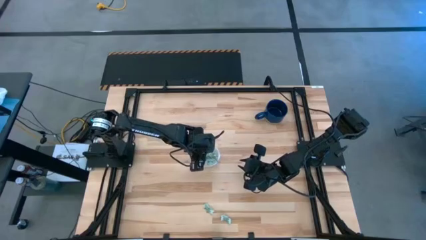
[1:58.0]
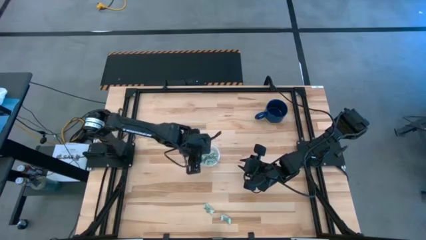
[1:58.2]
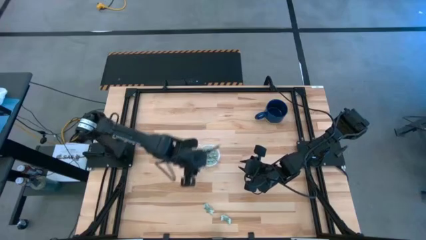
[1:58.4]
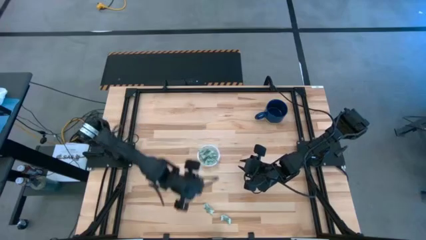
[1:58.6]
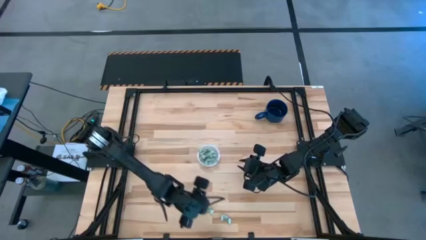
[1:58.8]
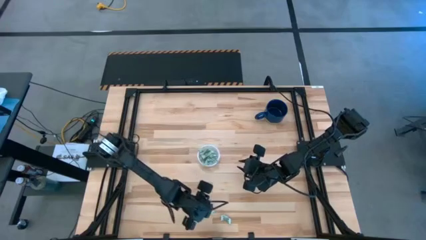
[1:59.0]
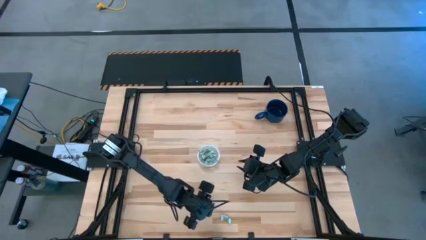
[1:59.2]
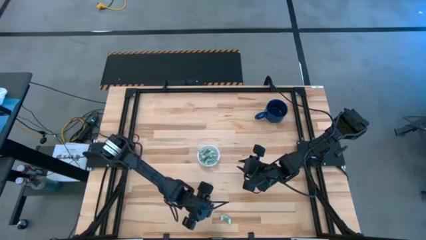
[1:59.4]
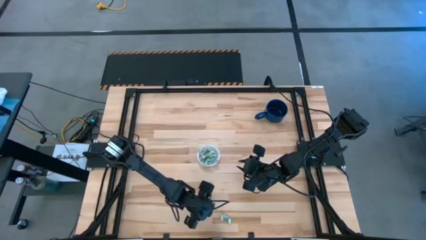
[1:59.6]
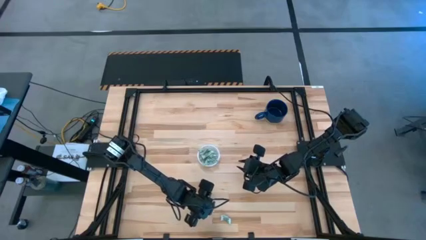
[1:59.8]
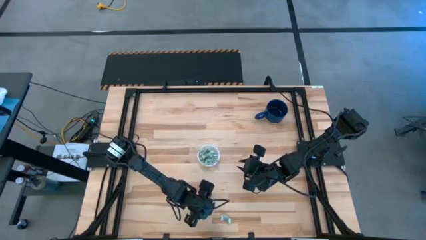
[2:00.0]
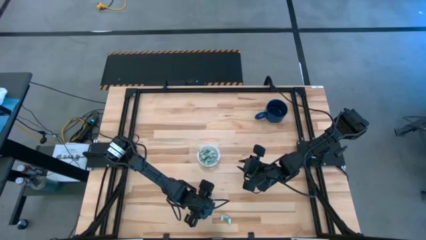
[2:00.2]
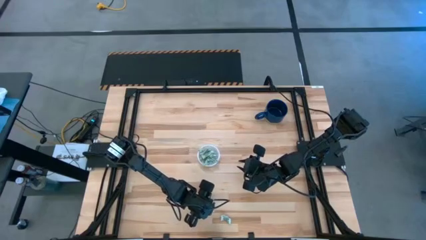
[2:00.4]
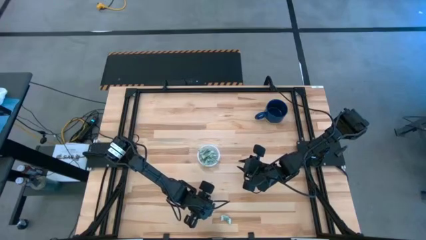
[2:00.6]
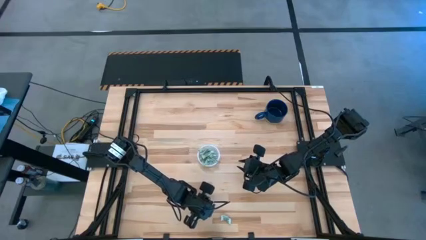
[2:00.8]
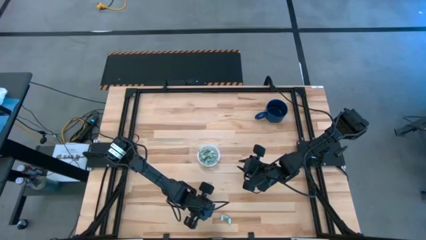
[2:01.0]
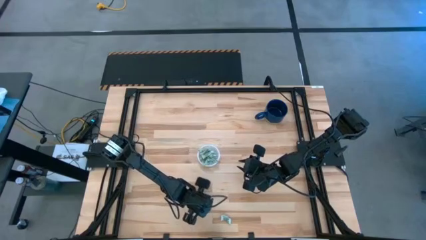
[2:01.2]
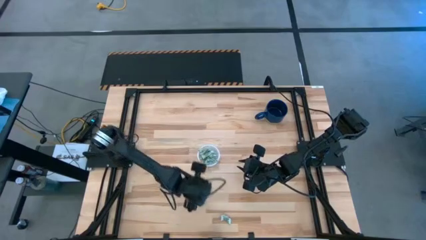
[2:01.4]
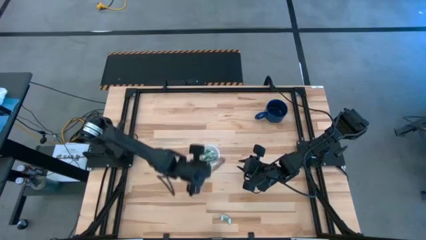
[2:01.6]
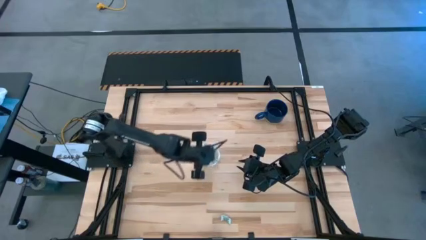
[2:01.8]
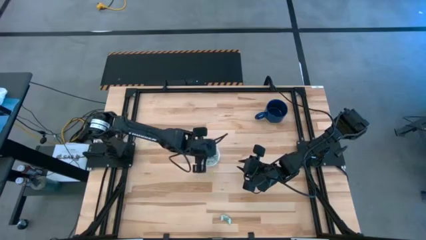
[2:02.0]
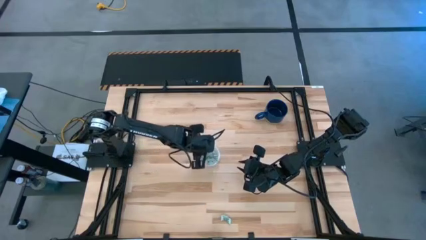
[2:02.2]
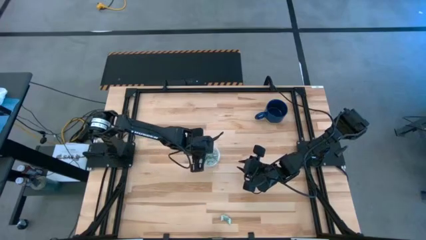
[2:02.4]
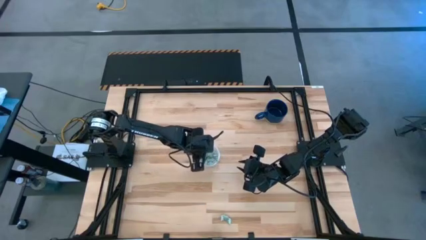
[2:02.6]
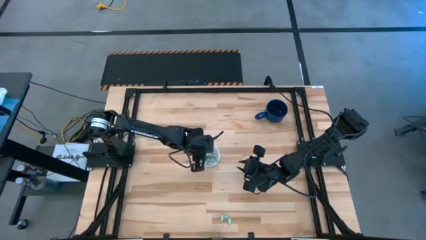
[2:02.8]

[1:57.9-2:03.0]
Task: Pick and place items into bin
Put the stevia packet into the transparent bin

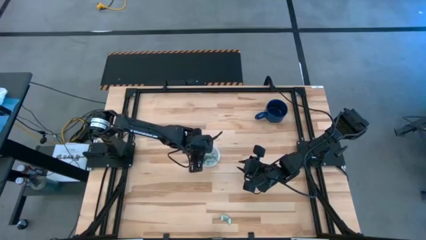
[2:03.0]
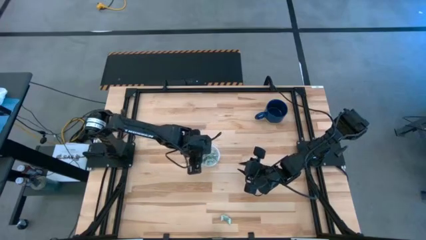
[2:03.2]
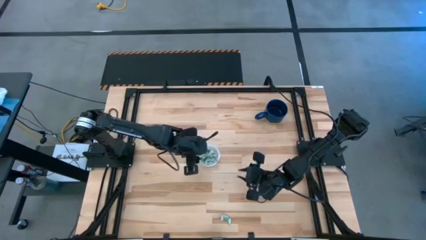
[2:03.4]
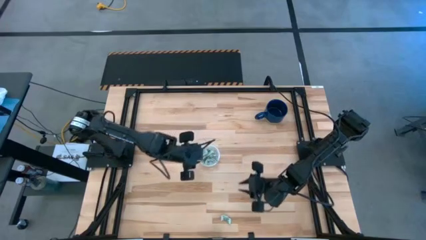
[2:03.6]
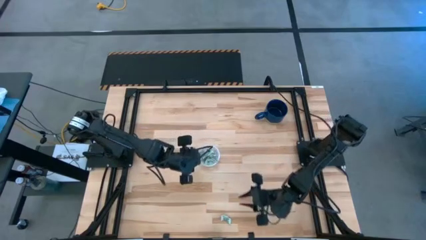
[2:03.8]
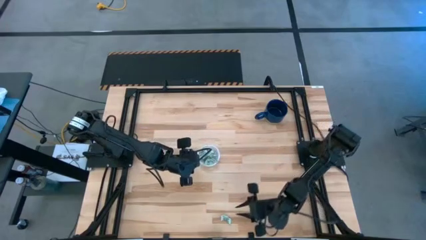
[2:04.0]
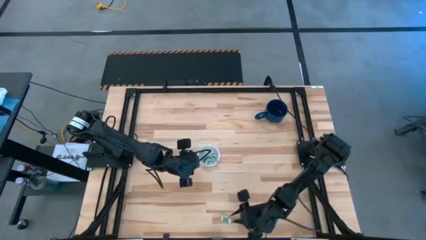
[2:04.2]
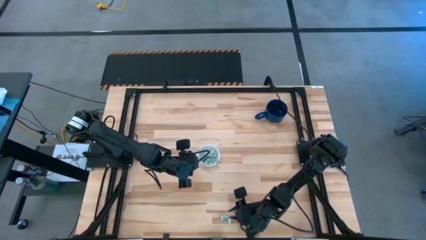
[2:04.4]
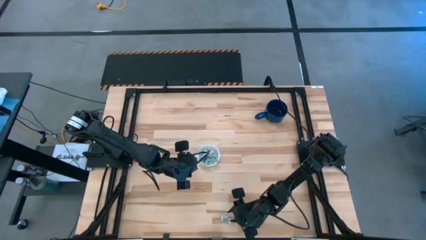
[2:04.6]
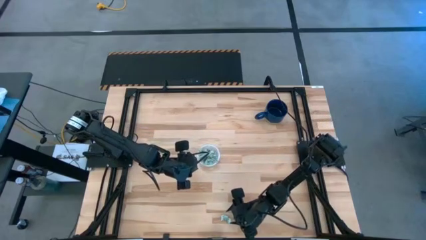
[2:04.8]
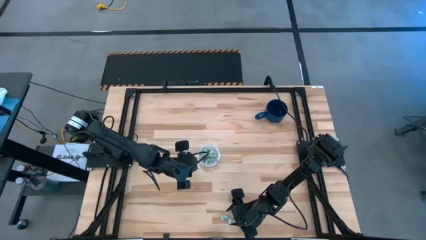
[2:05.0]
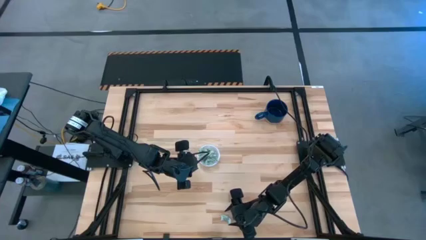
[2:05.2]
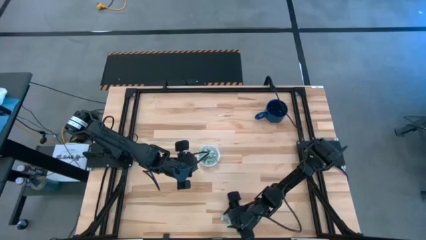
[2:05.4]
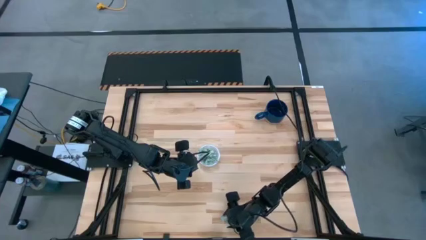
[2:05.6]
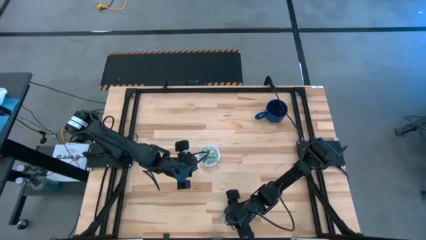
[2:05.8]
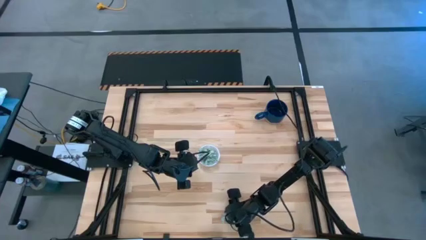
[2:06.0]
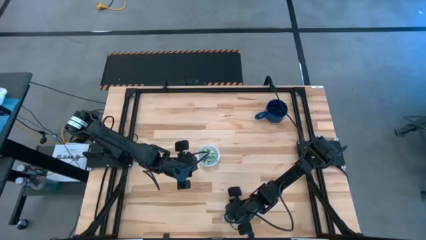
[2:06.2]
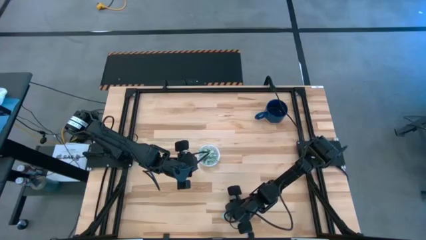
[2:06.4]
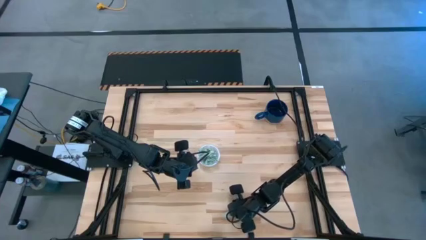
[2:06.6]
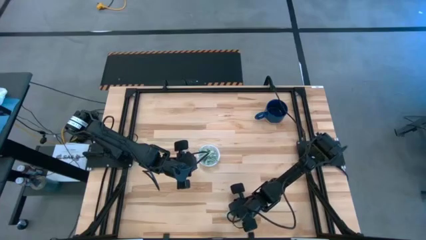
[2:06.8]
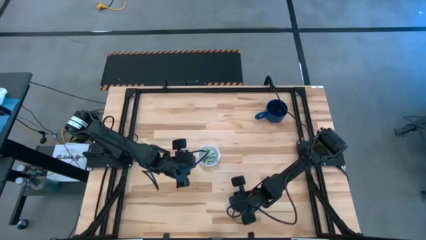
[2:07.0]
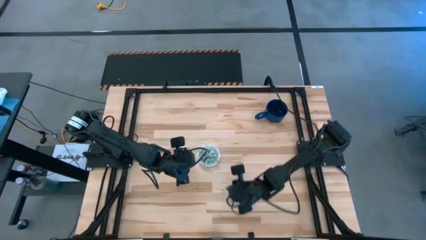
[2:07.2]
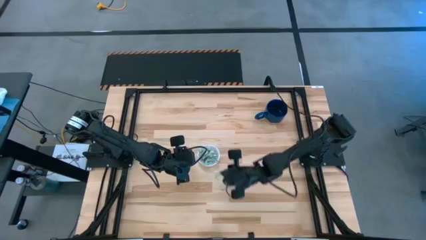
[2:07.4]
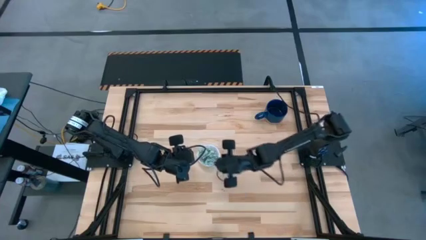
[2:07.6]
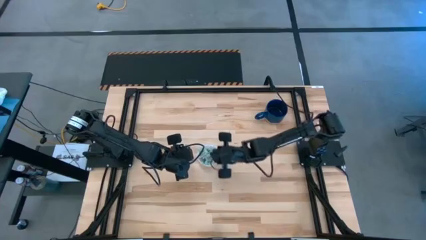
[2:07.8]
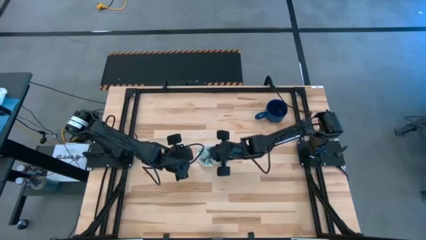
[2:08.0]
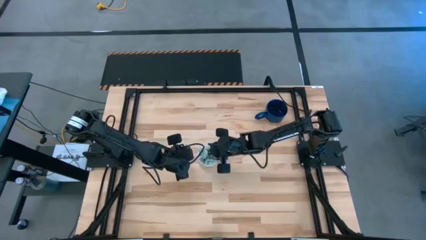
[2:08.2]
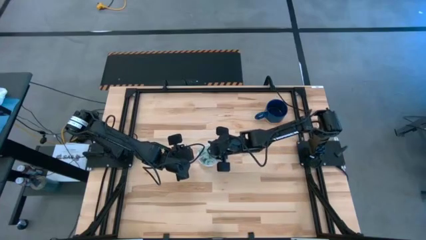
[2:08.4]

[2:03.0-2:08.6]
Put the stevia packet into the transparent bin

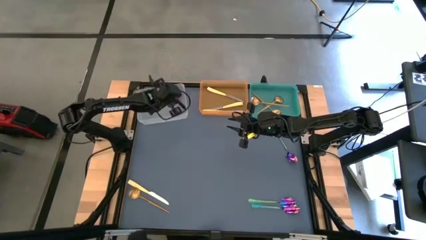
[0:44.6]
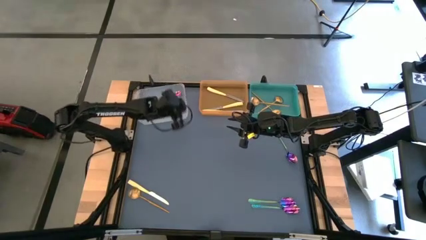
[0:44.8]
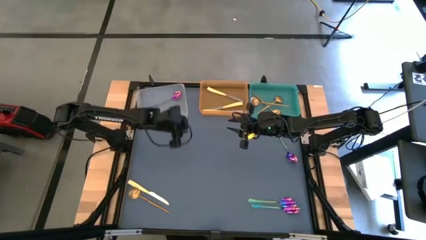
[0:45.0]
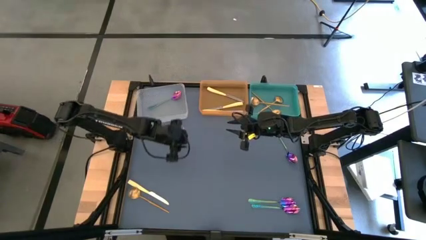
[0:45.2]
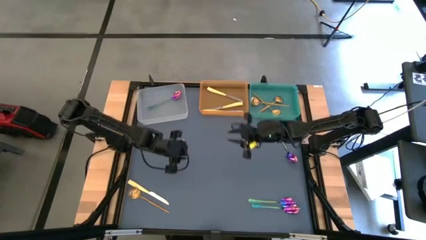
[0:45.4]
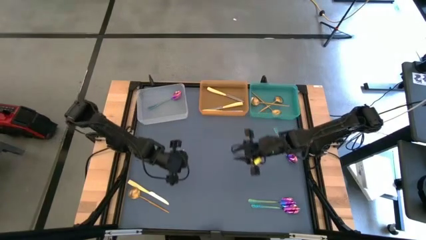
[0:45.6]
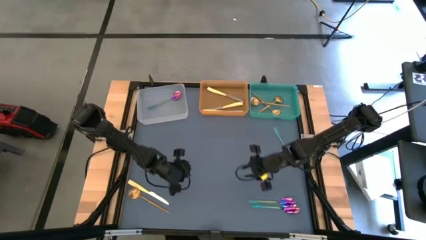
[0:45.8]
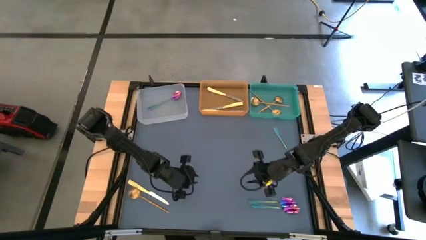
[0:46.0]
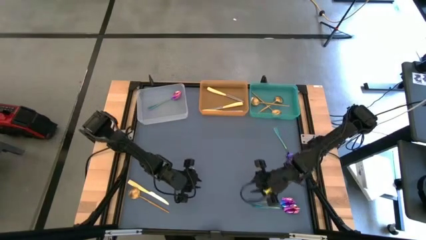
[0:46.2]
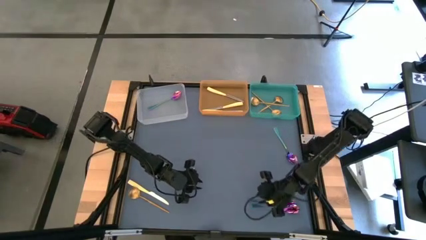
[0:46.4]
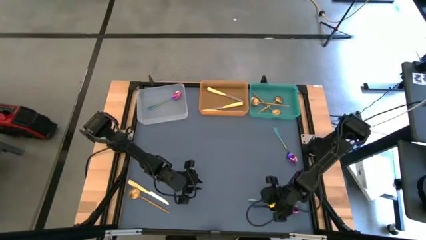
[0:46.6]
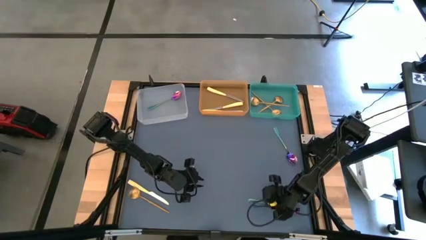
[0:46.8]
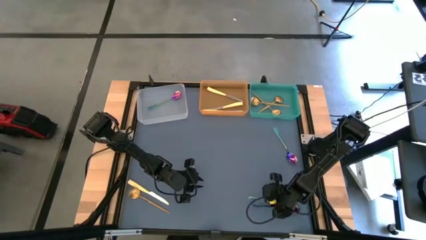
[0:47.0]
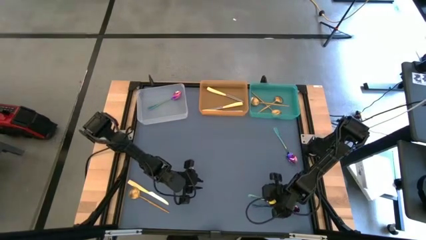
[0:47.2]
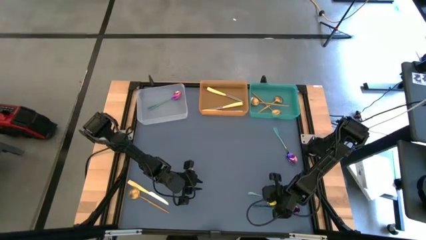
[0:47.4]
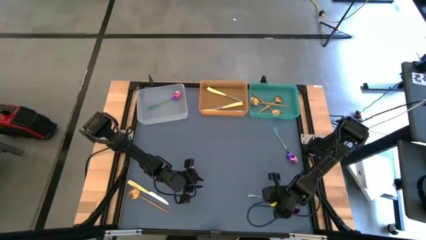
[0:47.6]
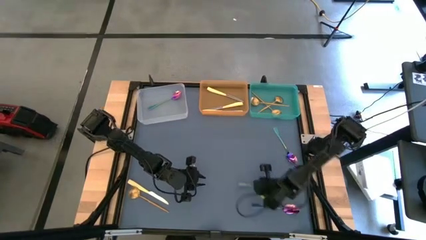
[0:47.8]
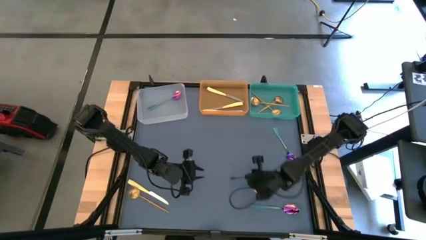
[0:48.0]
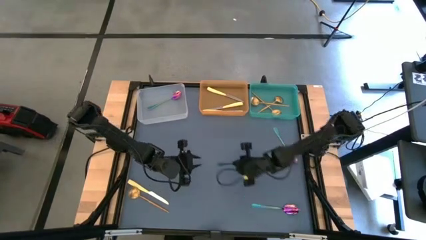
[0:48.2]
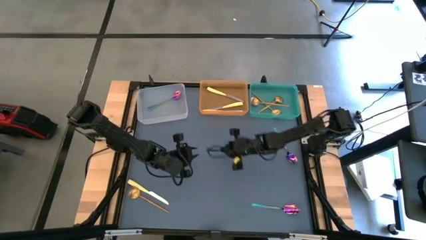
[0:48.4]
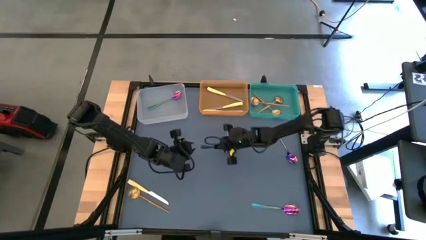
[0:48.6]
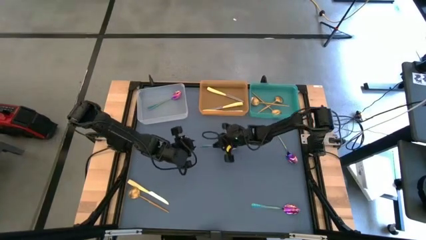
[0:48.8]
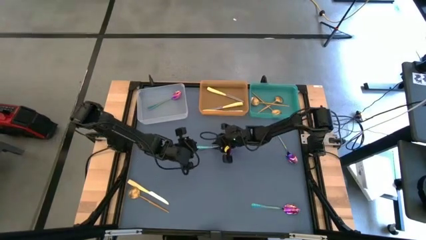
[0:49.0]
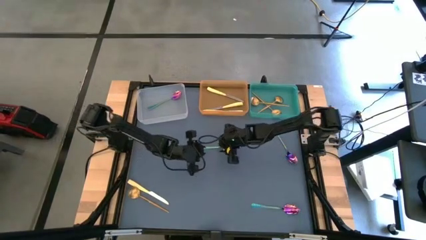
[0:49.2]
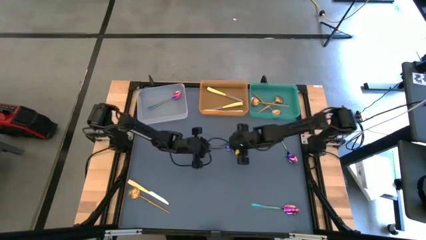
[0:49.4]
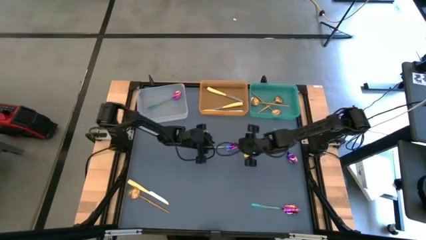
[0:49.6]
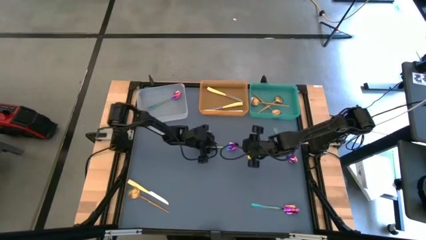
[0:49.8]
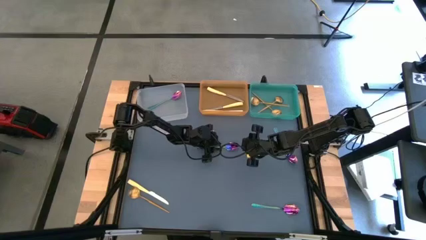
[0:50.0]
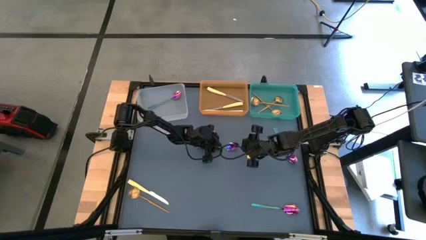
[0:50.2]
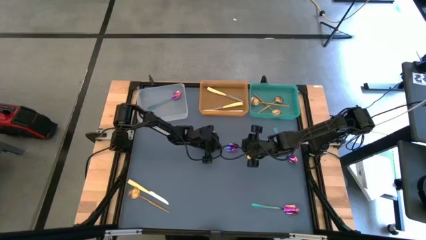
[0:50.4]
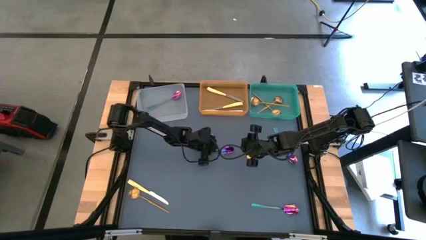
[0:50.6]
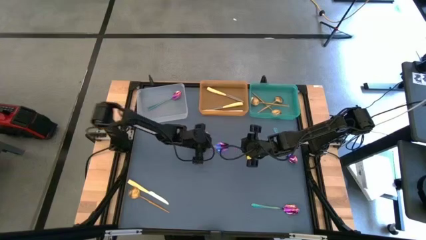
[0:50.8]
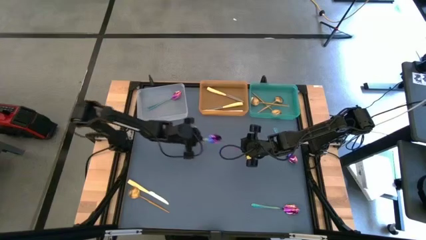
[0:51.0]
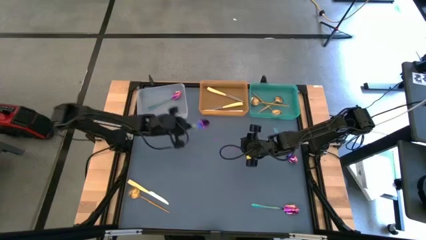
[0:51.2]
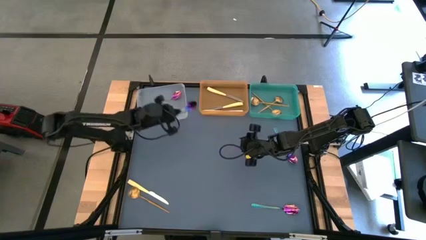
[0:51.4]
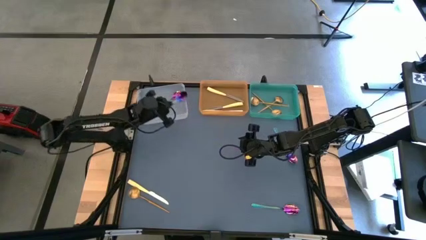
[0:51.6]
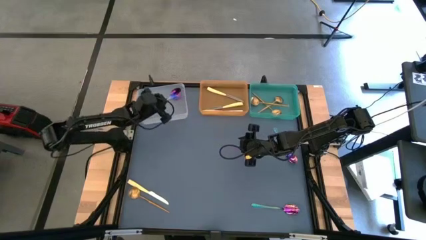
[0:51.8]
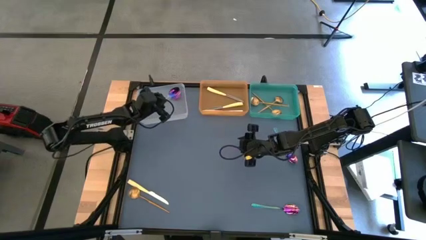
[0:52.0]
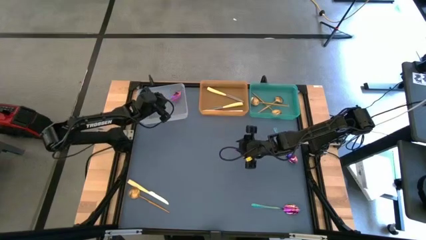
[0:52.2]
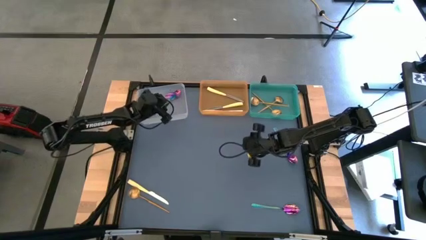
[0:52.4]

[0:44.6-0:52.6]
Task: Sort silverware by color (type)
Put the iridescent blue spoon into the transparent bin
